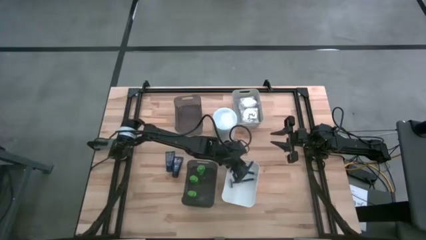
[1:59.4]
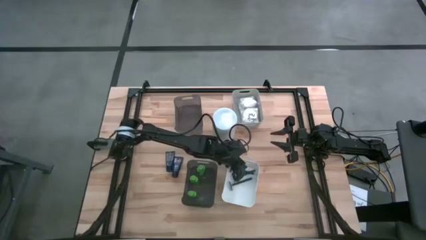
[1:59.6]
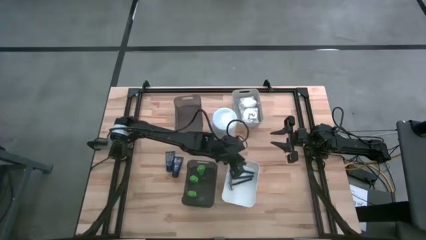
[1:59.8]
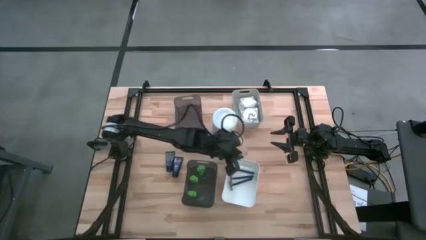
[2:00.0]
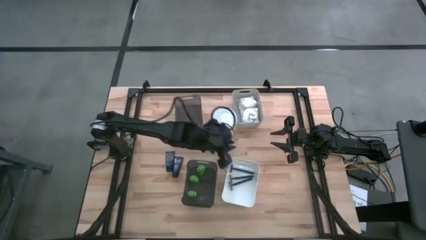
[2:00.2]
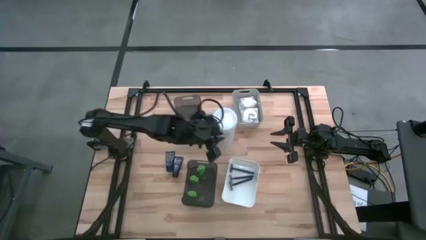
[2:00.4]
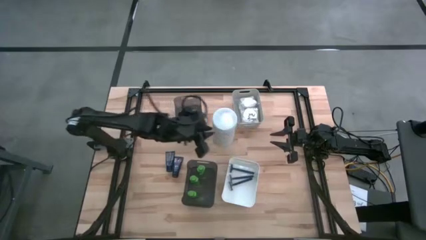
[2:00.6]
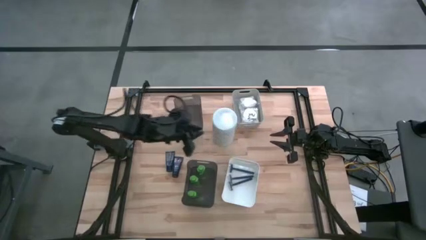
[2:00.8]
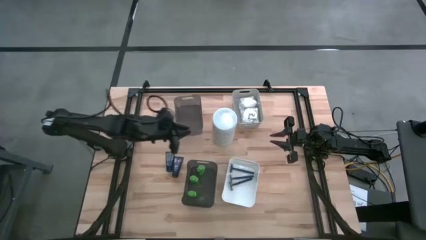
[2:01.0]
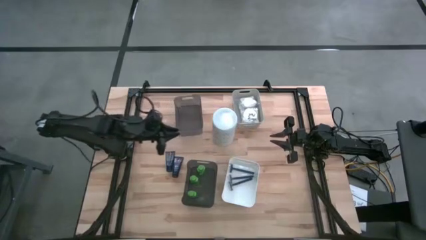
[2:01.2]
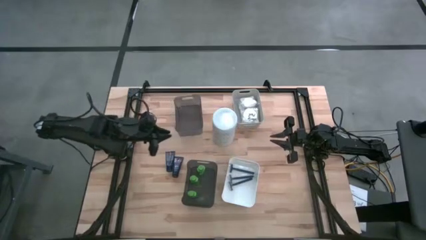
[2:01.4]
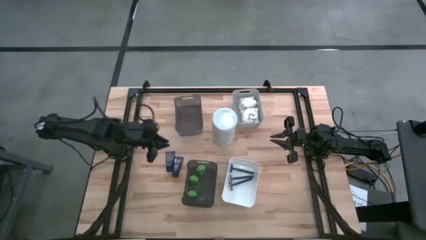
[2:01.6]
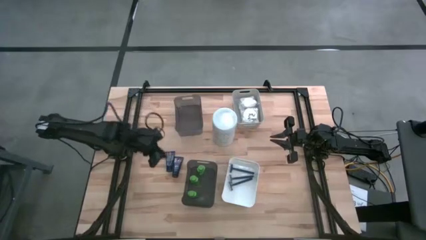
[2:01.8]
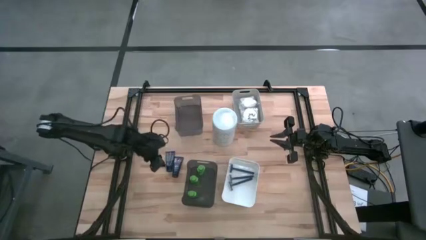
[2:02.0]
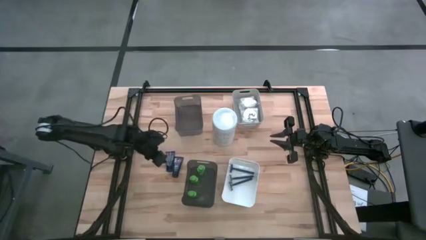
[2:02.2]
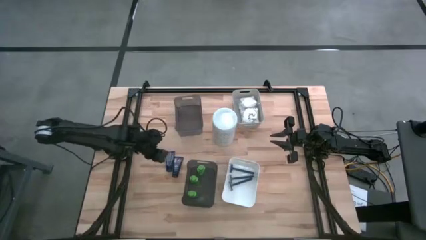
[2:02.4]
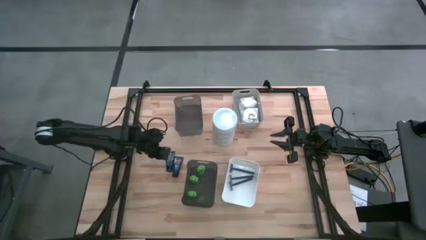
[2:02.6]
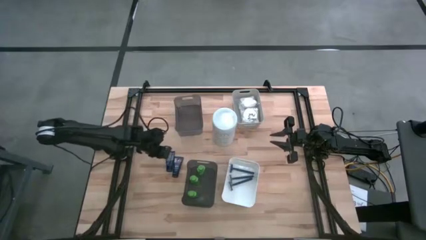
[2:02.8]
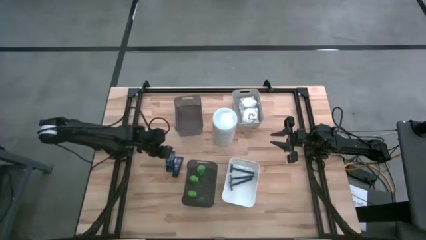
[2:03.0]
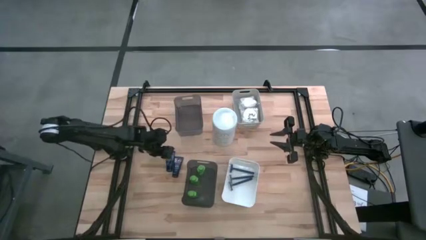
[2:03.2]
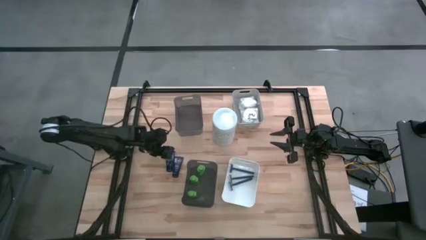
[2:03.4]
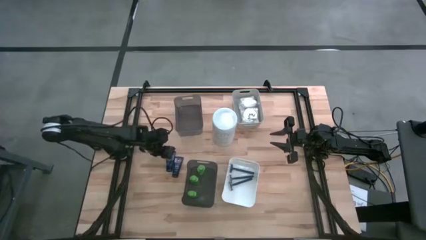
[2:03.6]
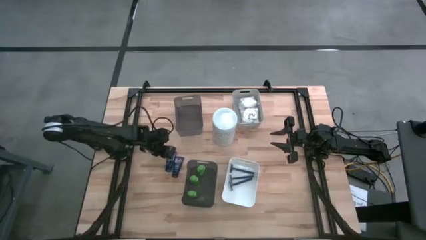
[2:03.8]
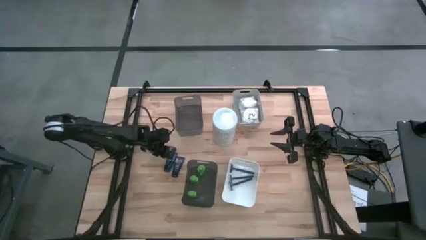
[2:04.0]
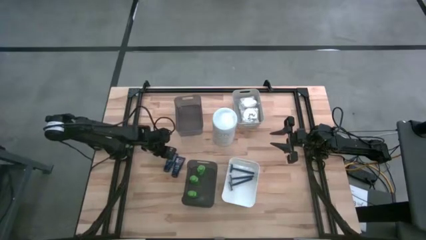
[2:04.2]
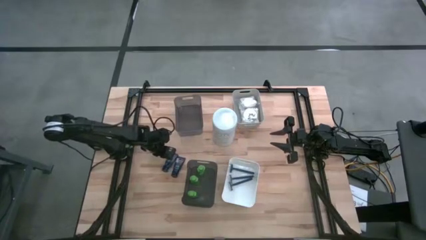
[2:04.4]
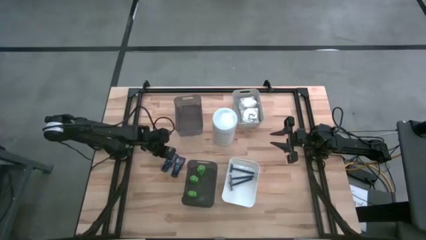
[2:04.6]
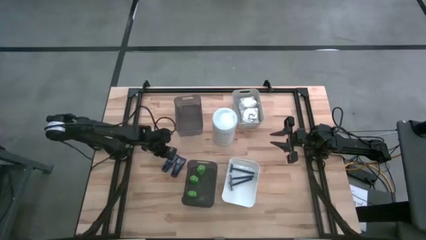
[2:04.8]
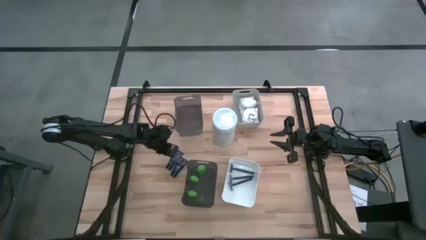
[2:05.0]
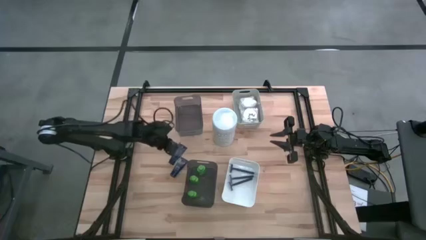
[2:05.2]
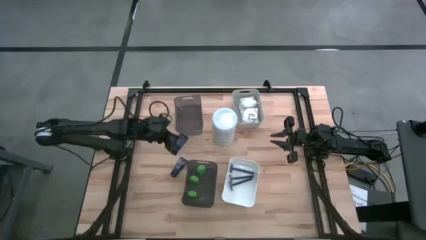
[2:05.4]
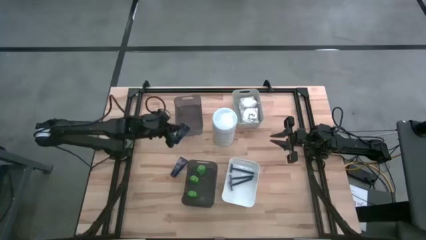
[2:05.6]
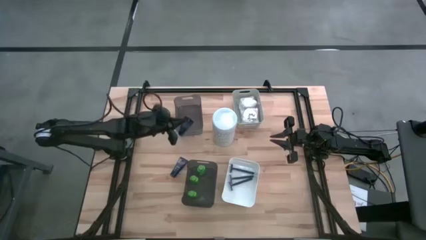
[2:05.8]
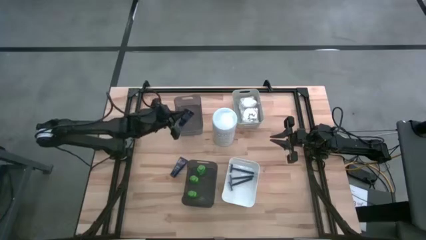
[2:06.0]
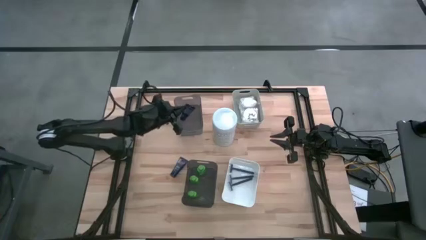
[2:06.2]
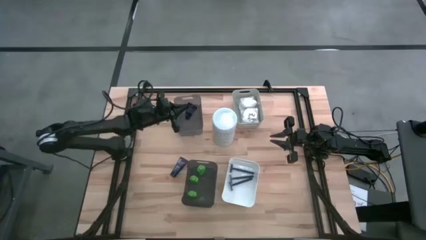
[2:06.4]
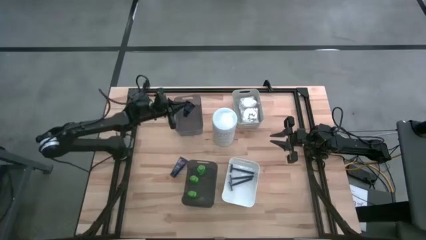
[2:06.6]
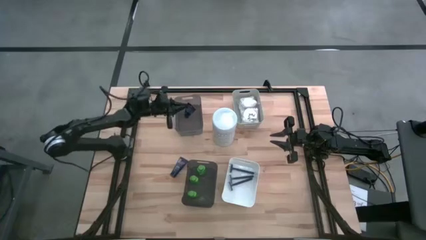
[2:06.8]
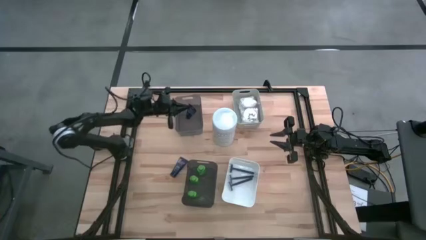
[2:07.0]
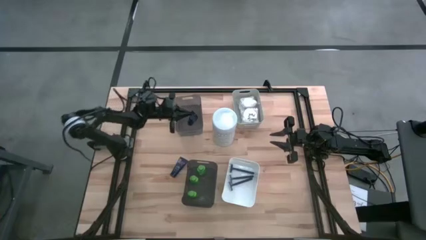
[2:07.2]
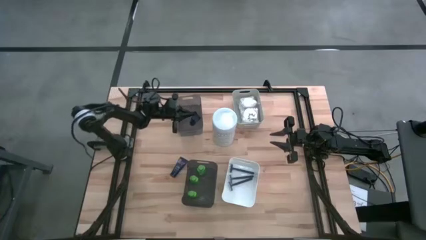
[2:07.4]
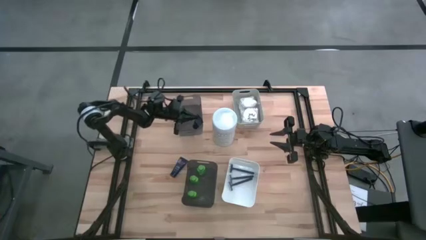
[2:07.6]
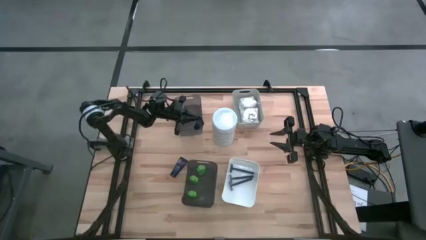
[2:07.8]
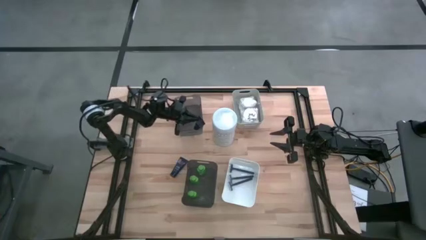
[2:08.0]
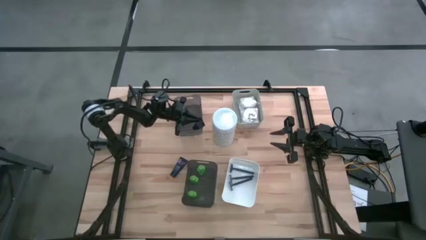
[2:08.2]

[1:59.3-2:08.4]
Task: Pick & Place Travel size toiletries
Put the blue shave cream into the top black bin

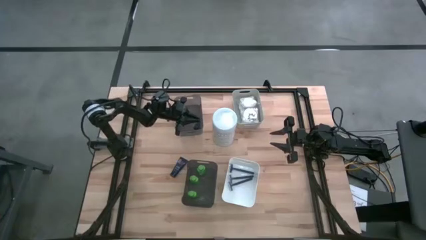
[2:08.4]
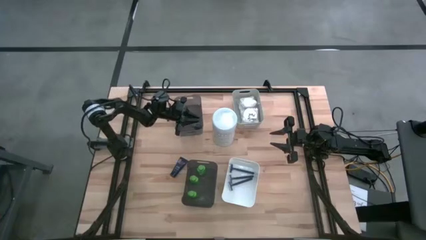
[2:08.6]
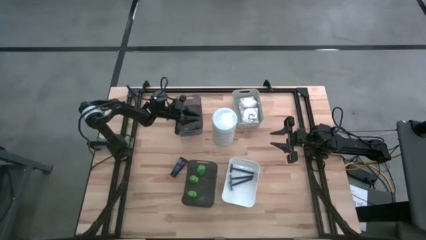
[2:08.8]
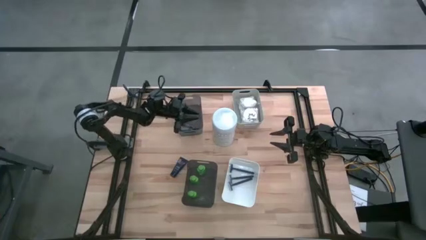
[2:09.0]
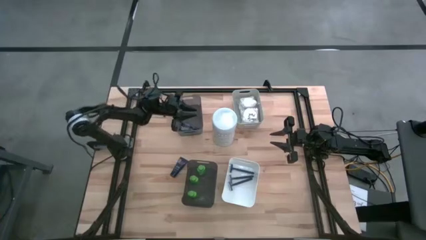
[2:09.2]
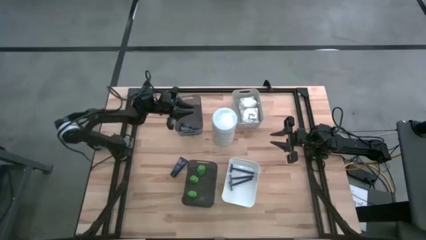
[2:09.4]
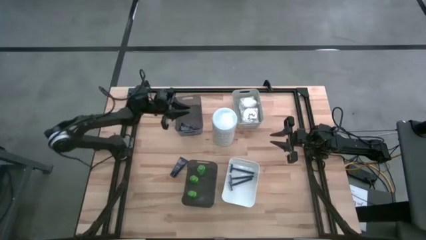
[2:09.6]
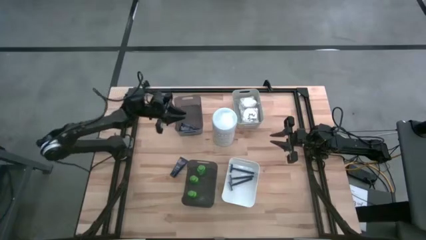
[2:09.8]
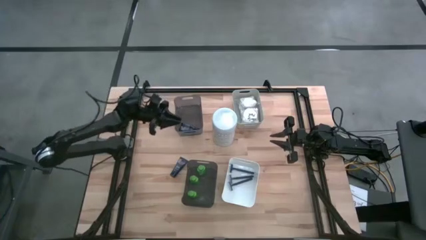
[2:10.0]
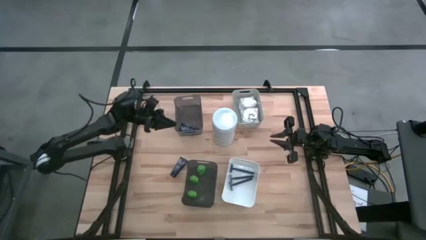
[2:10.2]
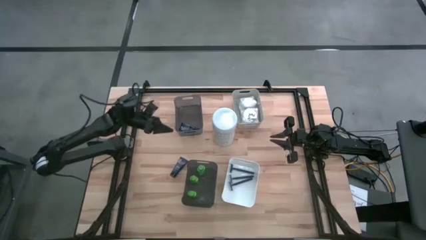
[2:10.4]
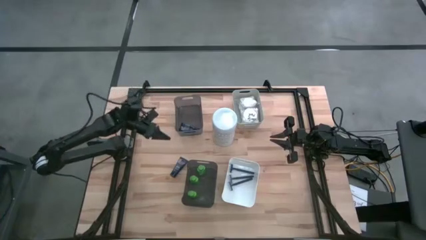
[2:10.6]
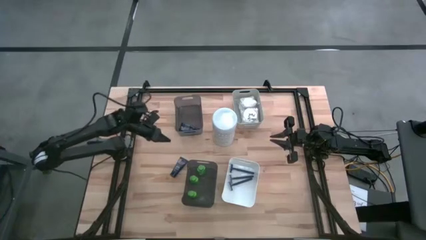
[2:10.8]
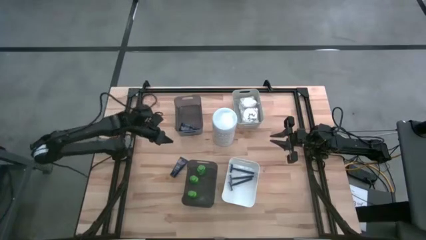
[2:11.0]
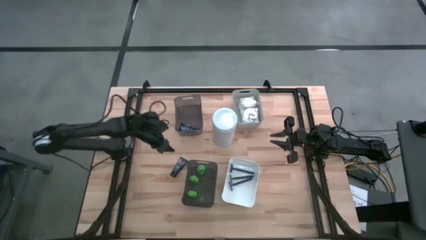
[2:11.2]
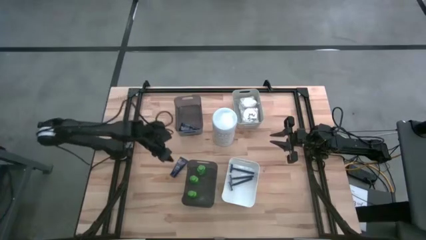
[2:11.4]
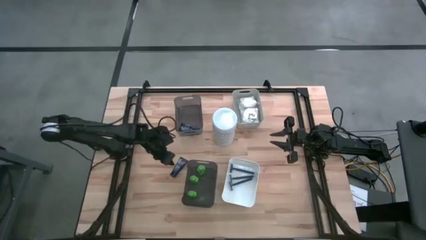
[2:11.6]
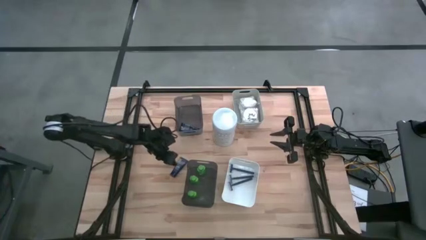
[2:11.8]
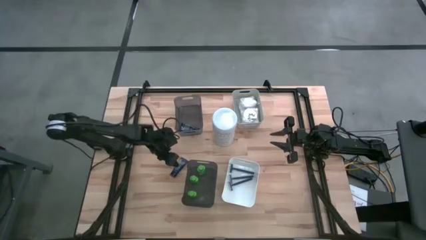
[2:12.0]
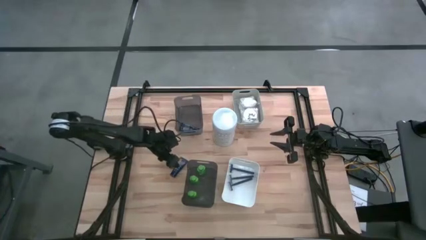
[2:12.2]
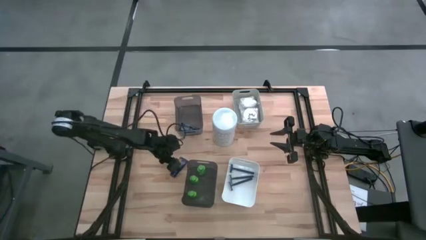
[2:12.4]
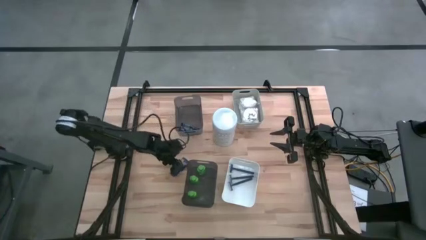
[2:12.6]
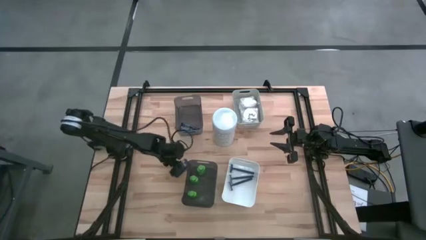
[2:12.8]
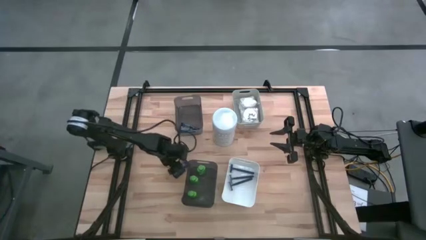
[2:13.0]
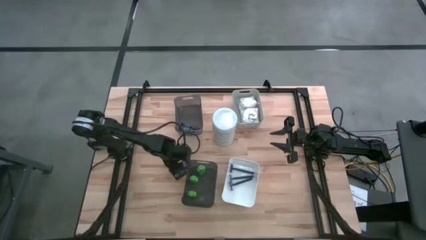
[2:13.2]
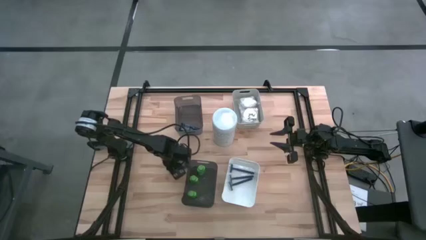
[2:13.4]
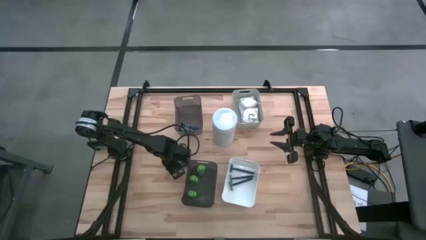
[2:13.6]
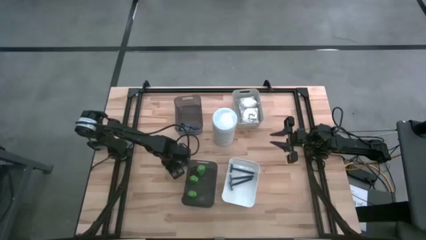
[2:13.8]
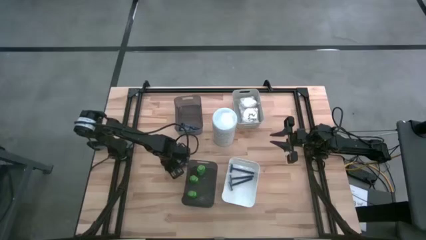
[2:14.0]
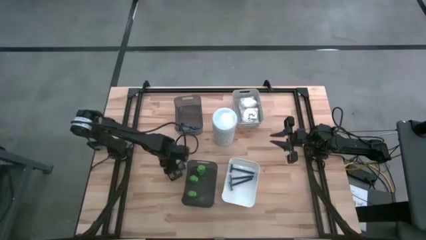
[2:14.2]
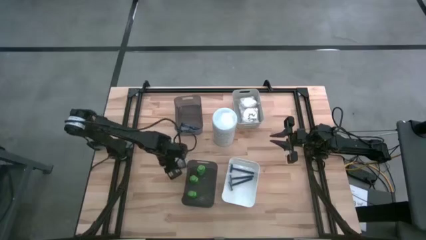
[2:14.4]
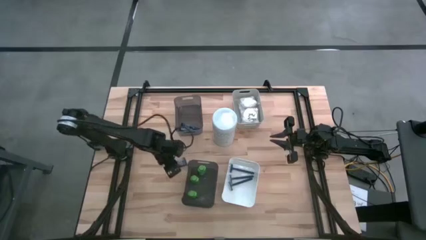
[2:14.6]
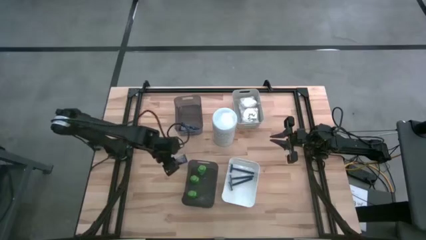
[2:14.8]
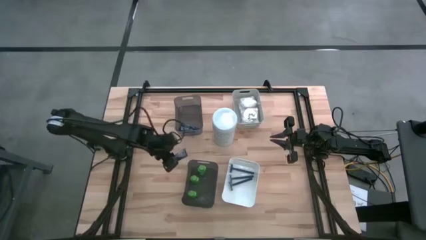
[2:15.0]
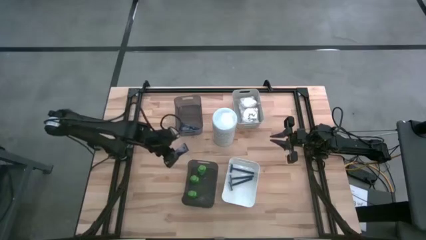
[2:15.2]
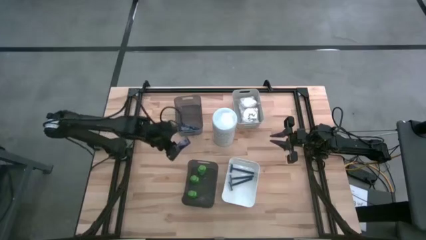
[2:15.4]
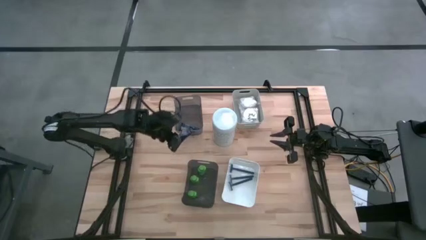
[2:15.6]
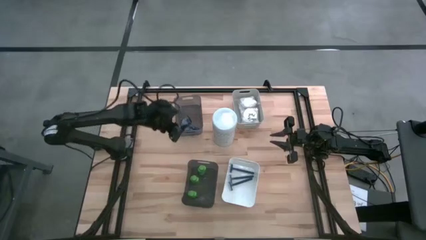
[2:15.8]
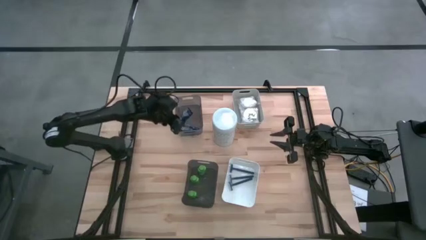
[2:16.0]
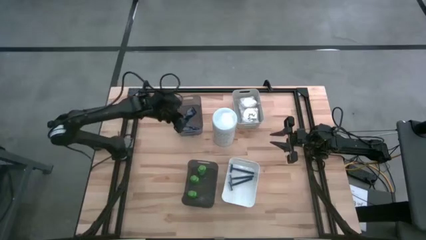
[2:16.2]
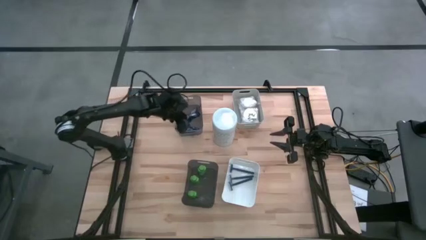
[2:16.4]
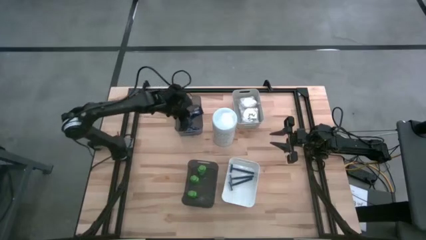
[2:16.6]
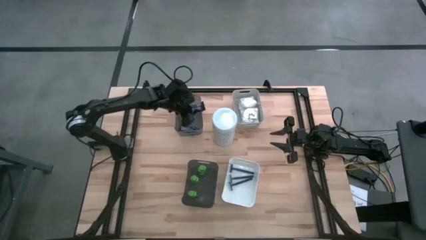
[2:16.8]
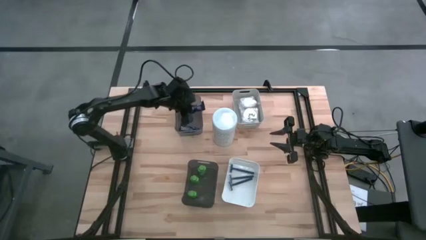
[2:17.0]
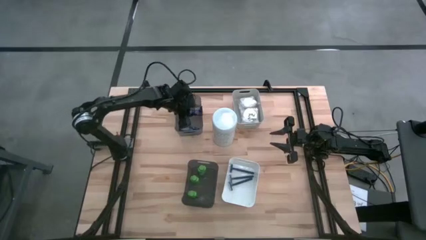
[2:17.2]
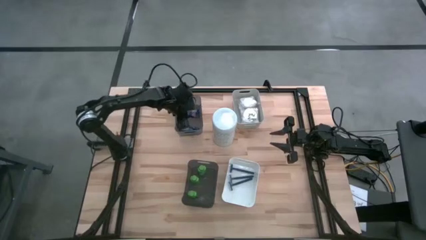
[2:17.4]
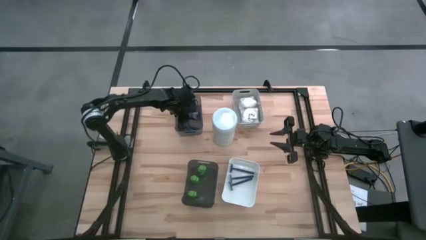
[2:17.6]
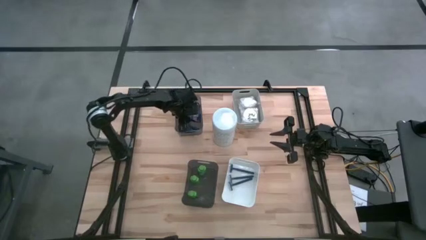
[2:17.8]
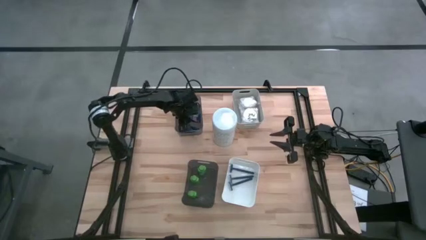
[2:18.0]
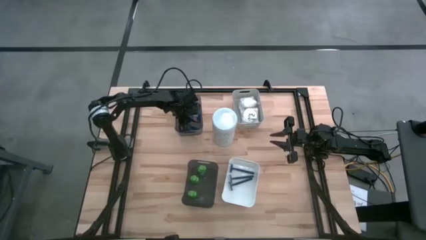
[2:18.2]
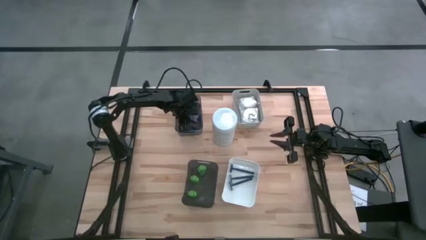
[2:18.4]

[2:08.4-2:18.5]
Put the blue shave cream into the top black bin
